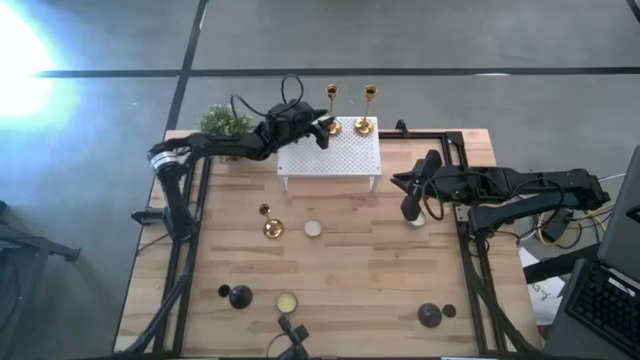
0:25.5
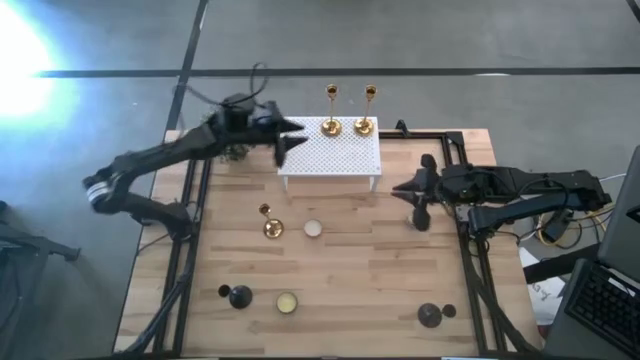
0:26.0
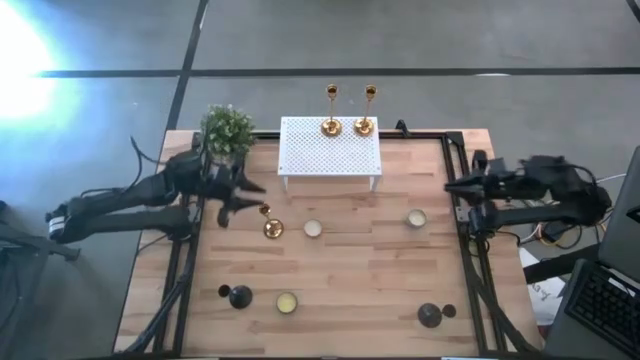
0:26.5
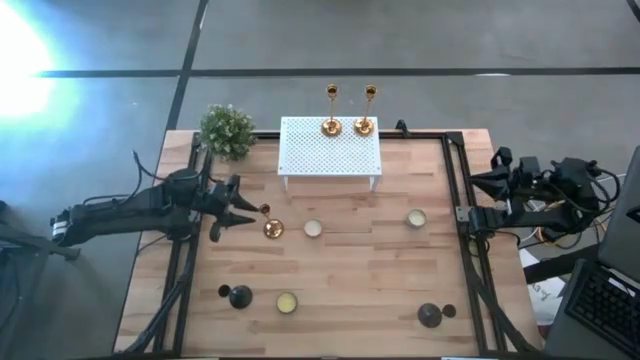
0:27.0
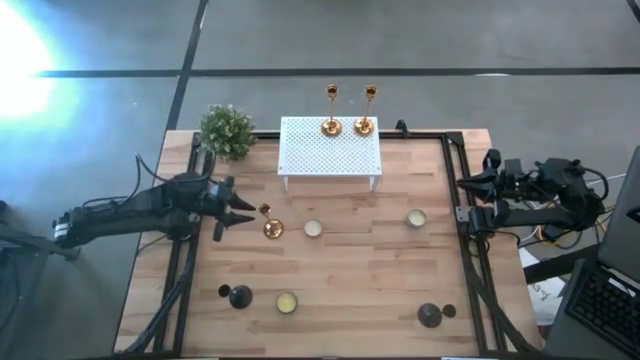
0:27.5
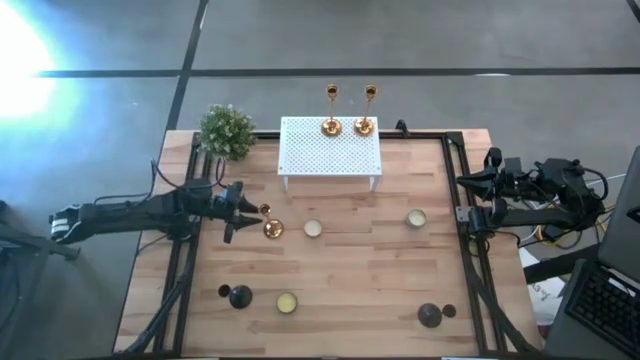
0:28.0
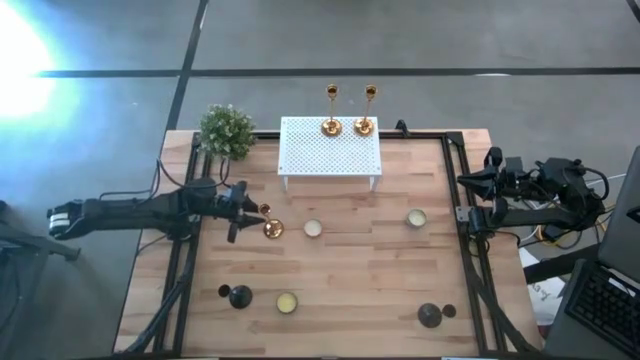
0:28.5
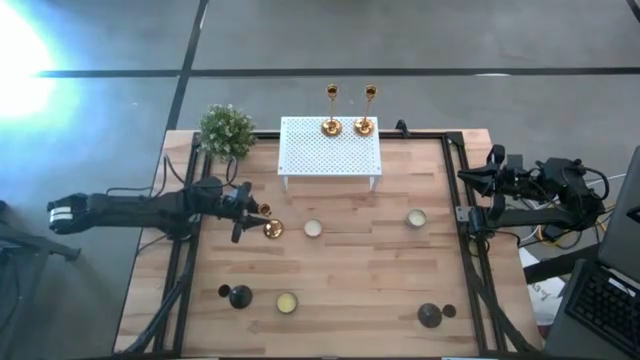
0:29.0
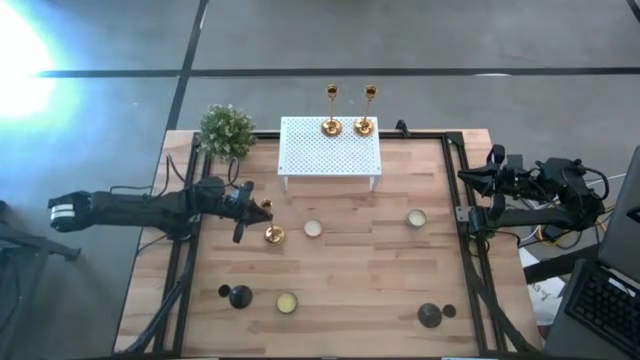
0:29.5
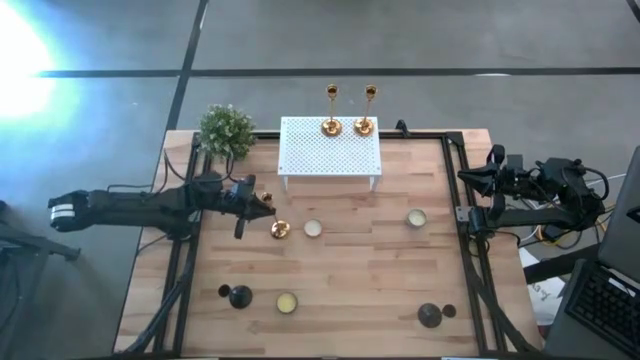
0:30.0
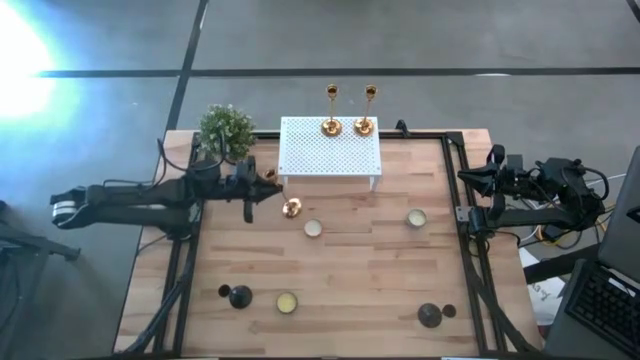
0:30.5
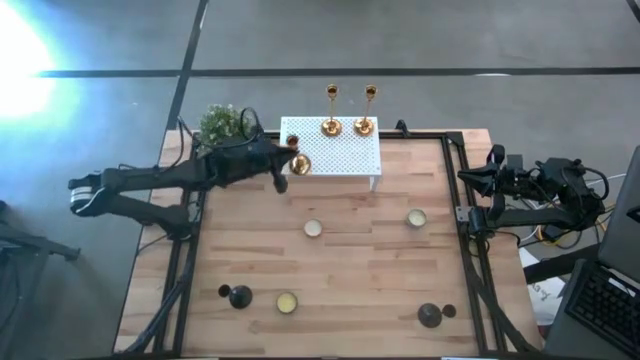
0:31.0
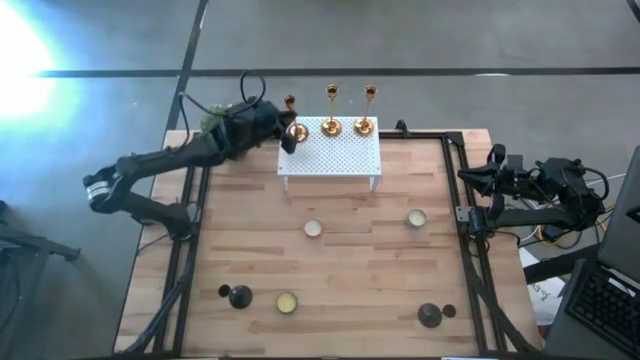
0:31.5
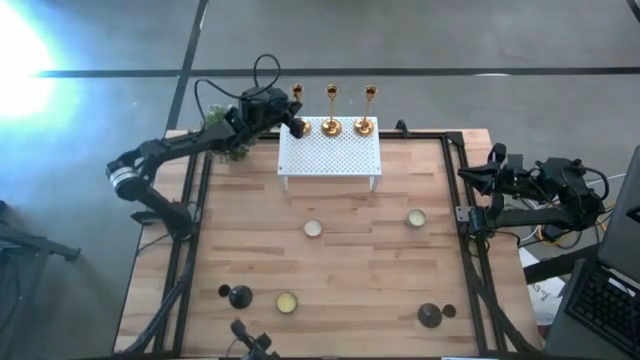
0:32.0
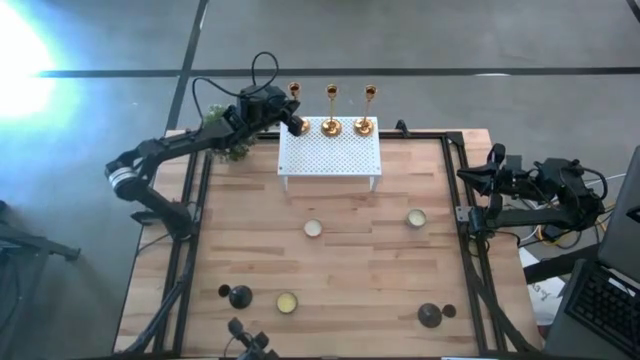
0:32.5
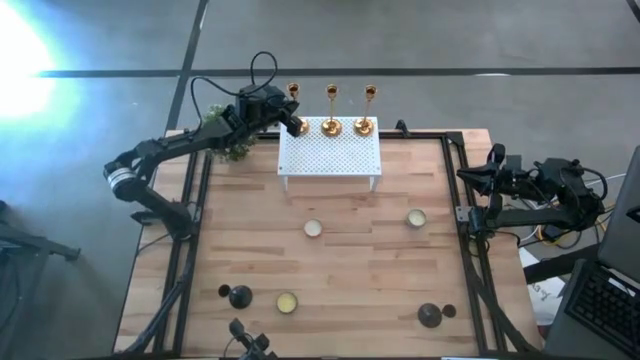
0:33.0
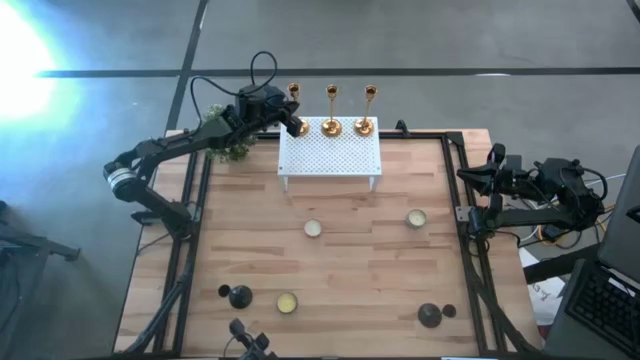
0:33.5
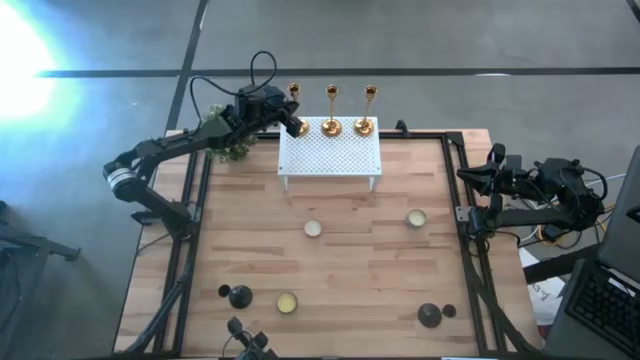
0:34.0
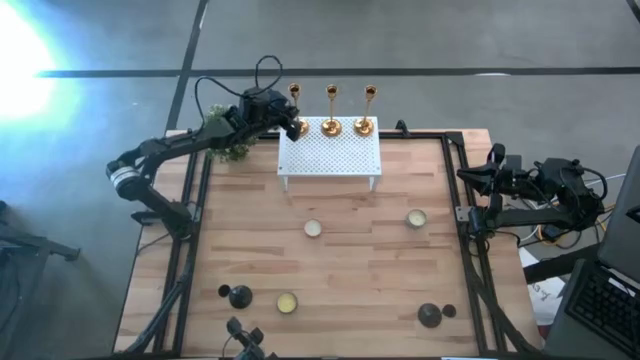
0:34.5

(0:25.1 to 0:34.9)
Task: Pick & Place candle stick holders
Put the golden candle holder on the shelf aligned with the other golden candle holder

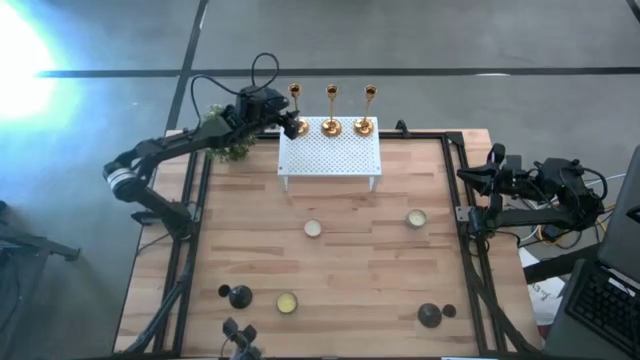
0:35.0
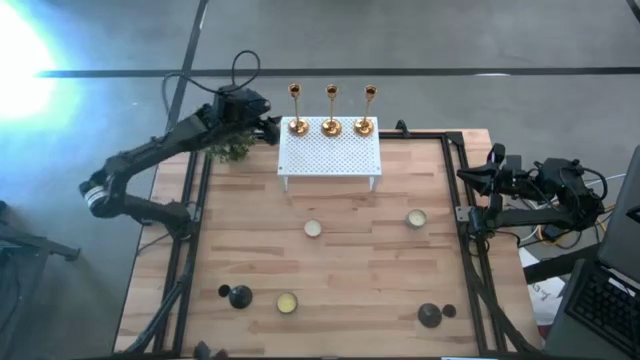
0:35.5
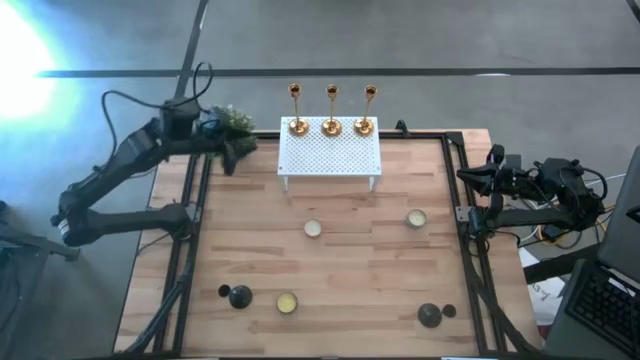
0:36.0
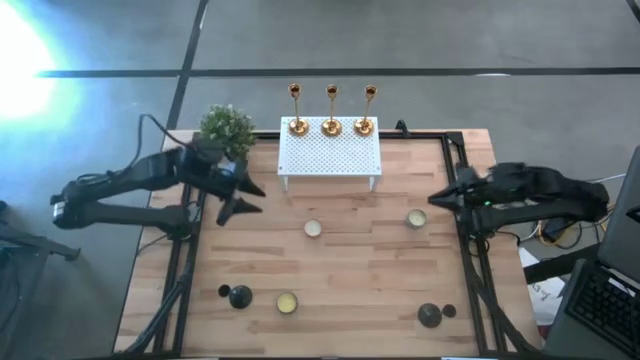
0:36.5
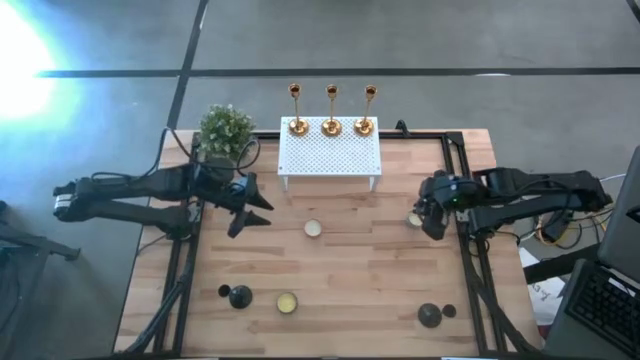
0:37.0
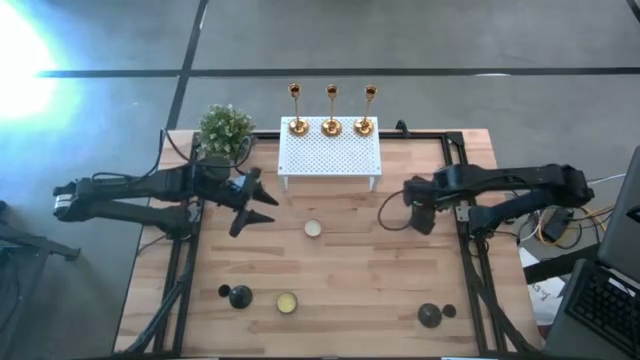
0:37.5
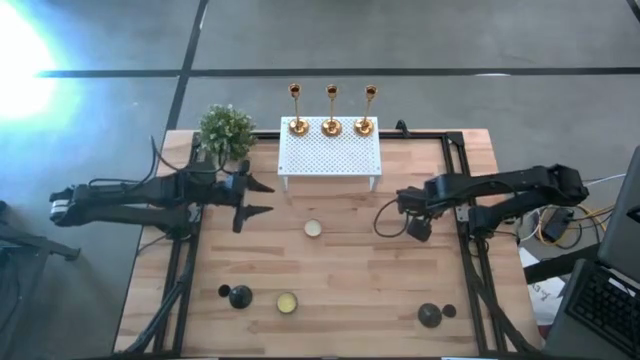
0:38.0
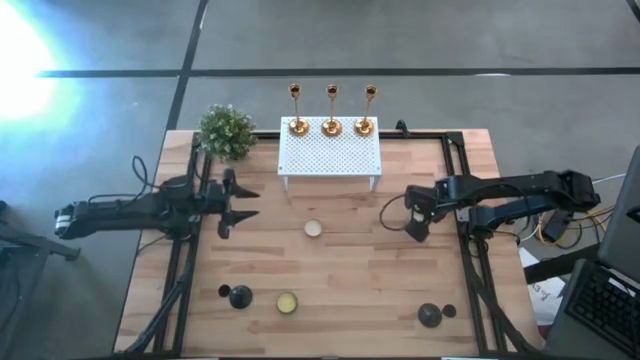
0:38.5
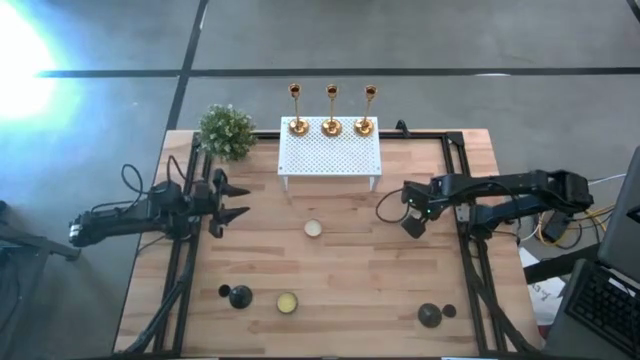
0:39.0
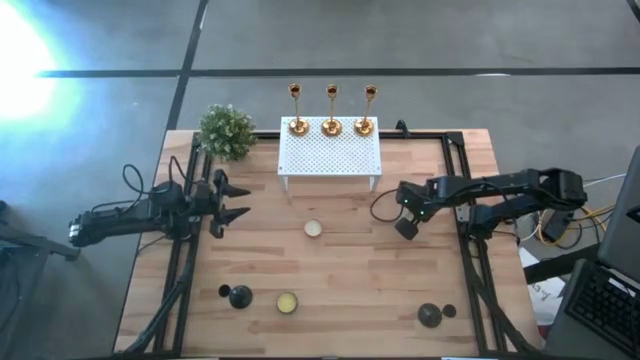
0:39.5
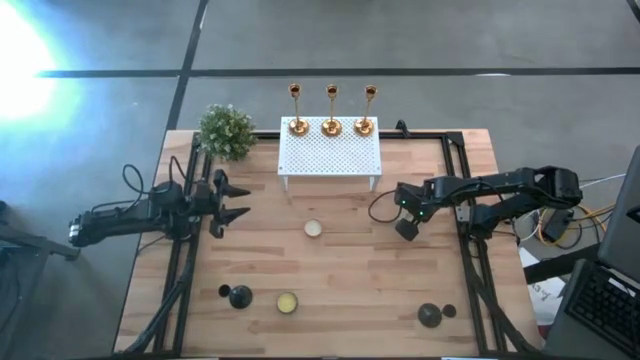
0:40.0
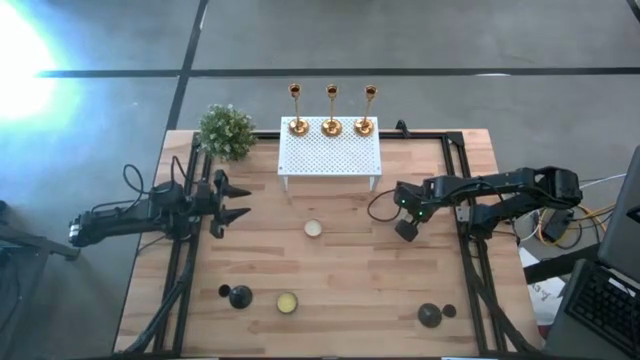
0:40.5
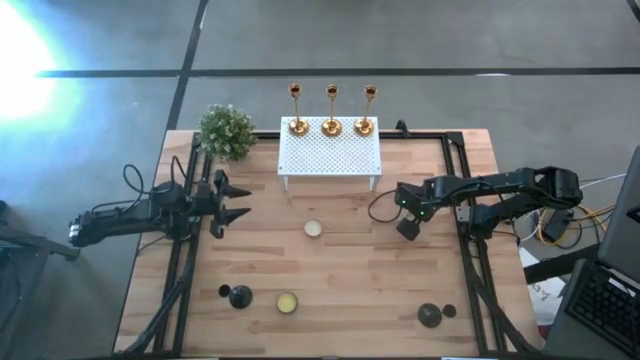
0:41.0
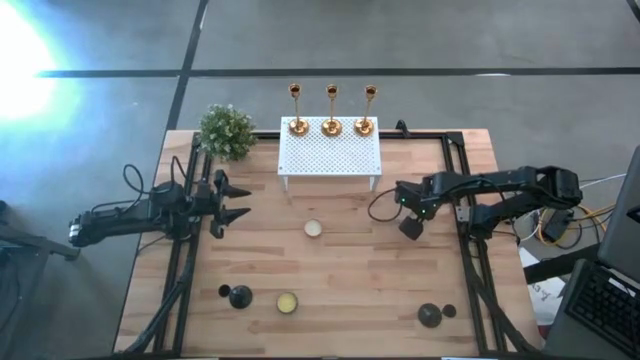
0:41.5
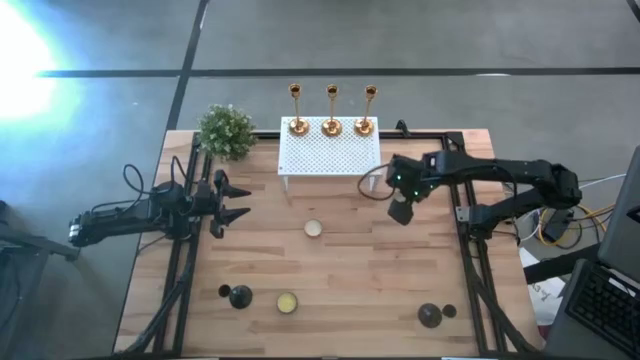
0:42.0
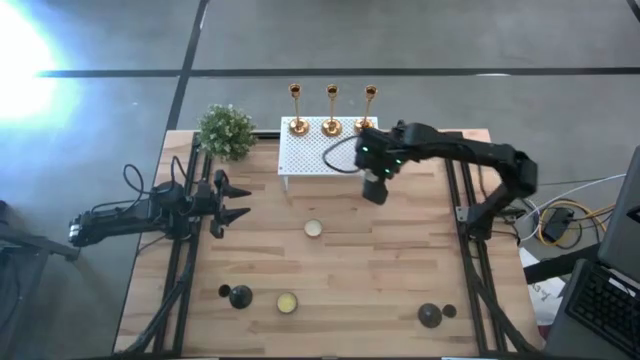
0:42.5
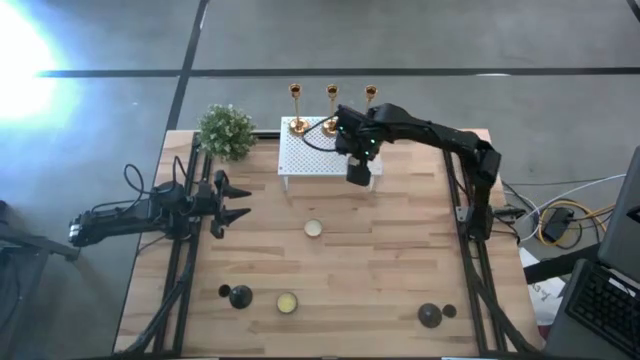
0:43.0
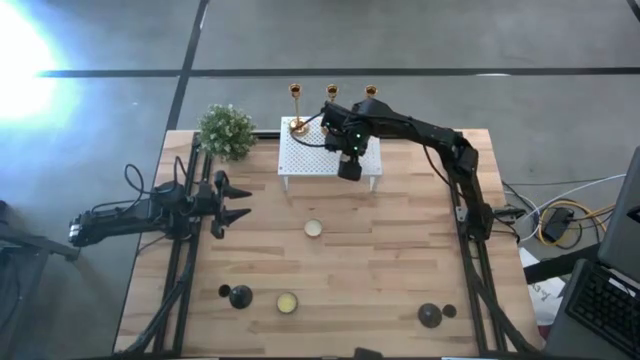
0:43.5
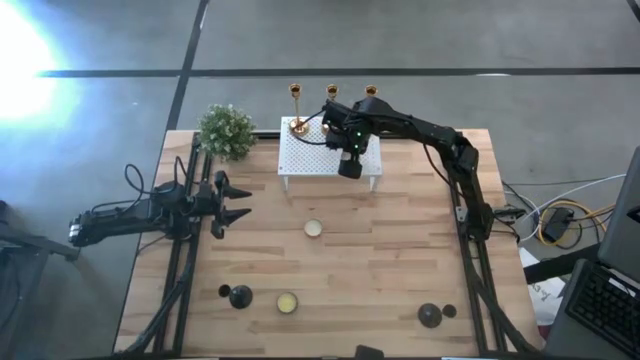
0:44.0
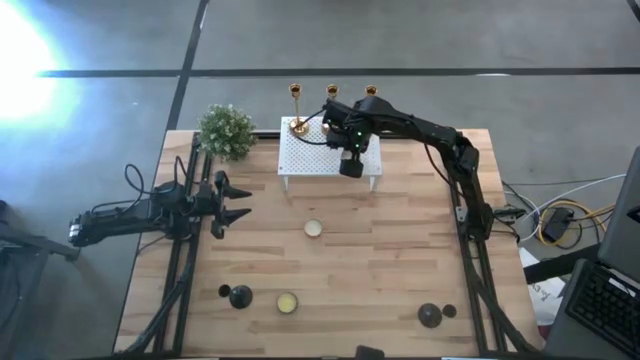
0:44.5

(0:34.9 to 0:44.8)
Put the blue scented candle on the shelf

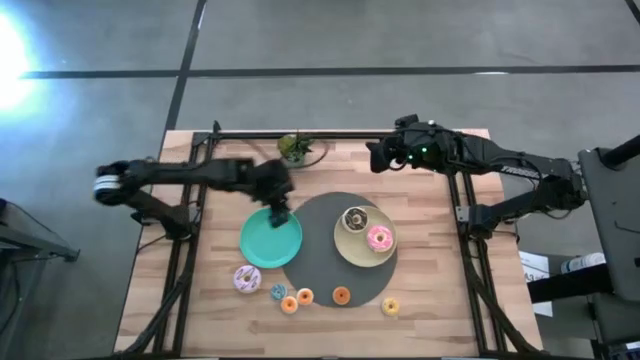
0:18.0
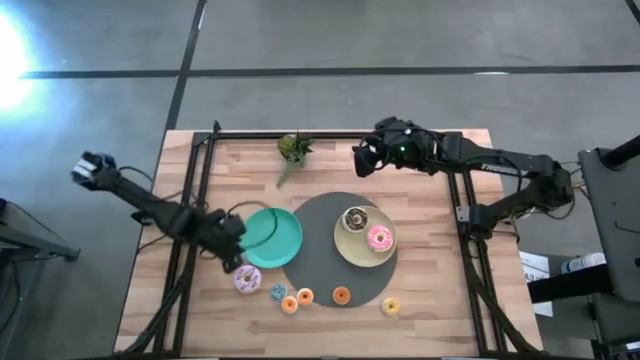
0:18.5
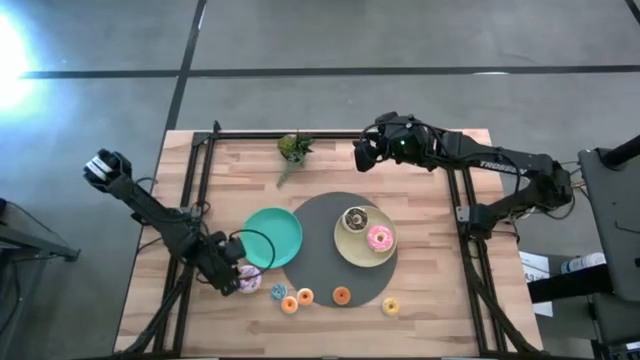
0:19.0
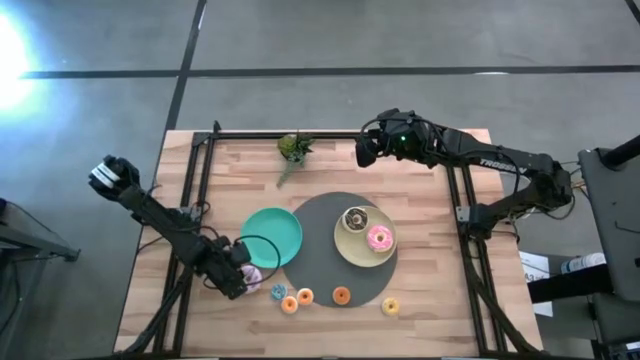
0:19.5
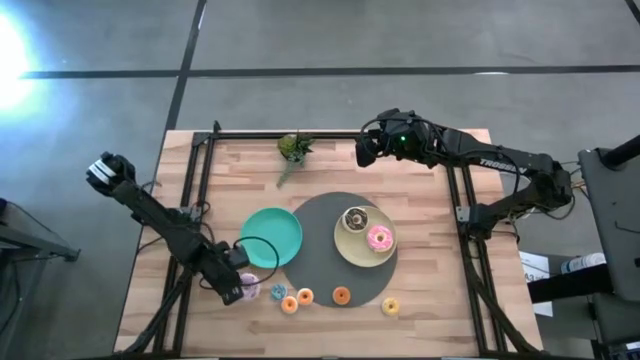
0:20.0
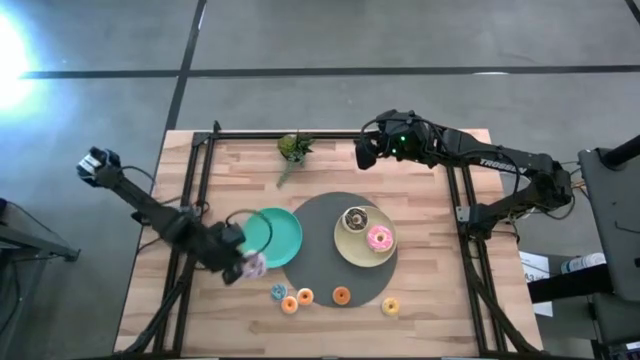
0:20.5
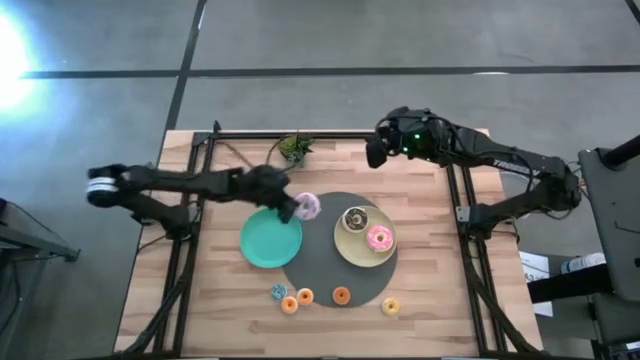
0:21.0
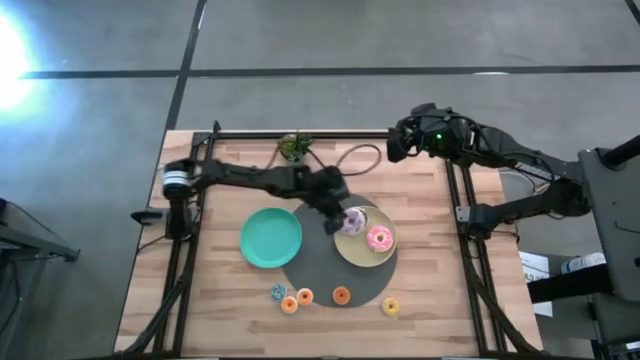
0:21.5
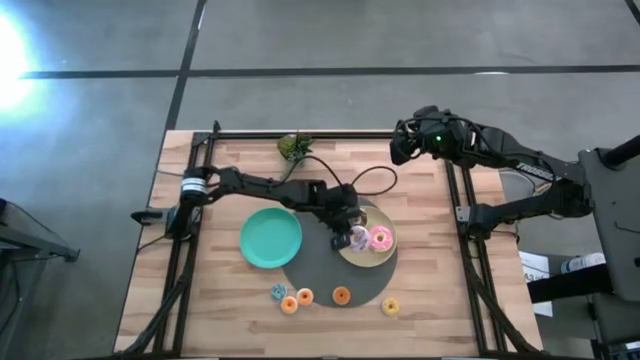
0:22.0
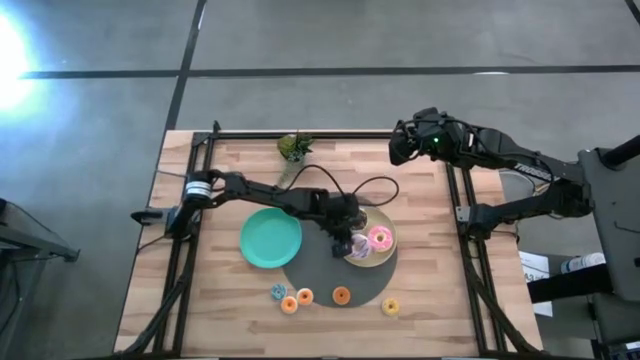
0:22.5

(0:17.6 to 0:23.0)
Task: Pick & Place donuts
Put the pink doughnut on the light brown plate
